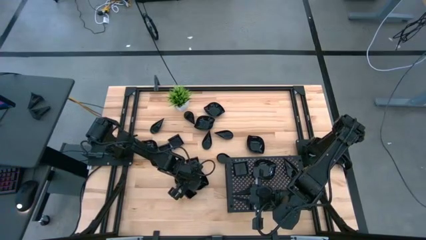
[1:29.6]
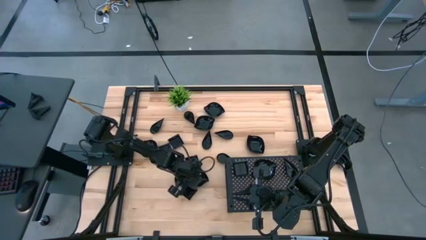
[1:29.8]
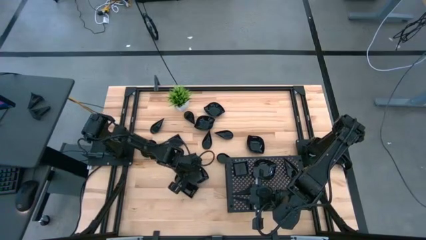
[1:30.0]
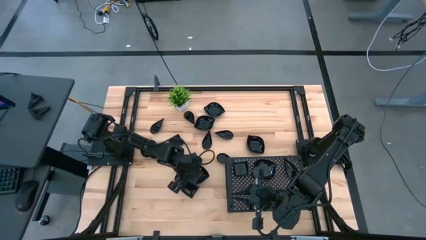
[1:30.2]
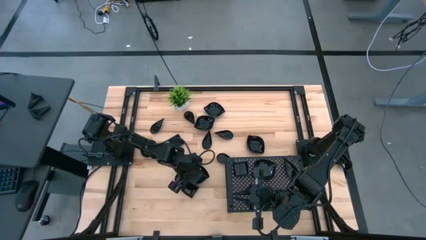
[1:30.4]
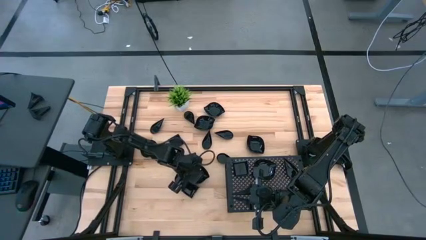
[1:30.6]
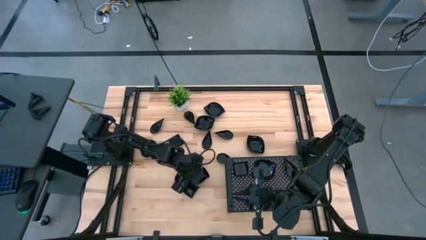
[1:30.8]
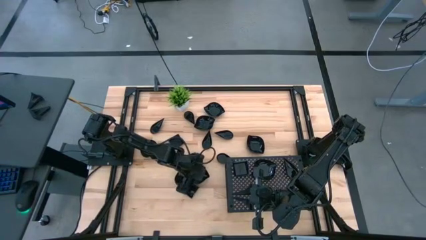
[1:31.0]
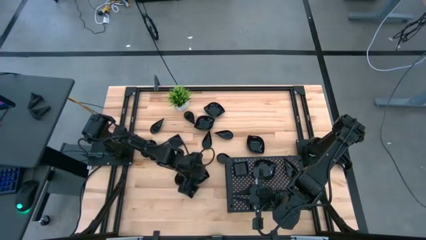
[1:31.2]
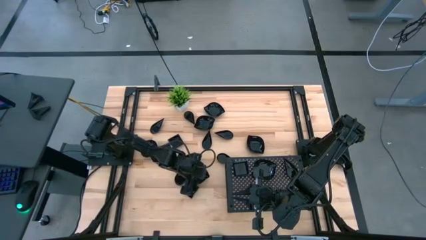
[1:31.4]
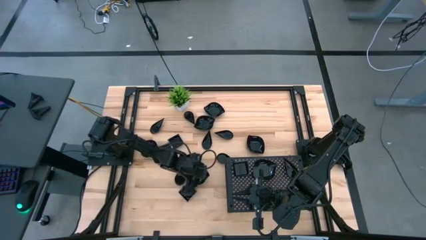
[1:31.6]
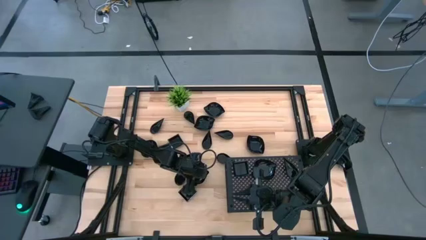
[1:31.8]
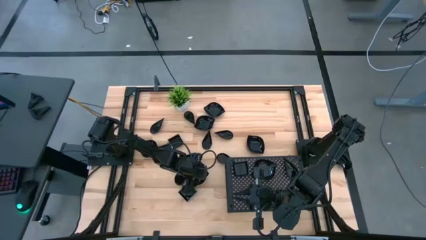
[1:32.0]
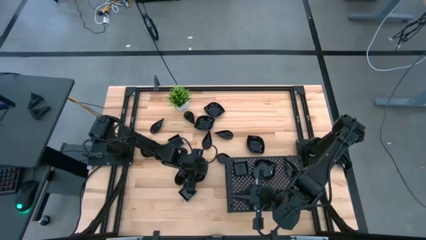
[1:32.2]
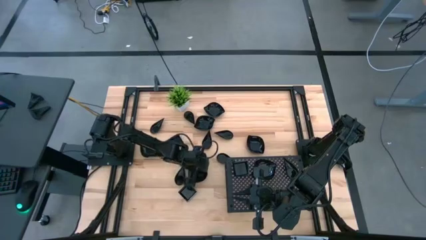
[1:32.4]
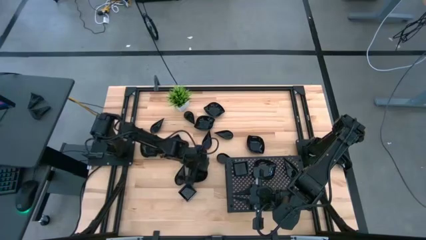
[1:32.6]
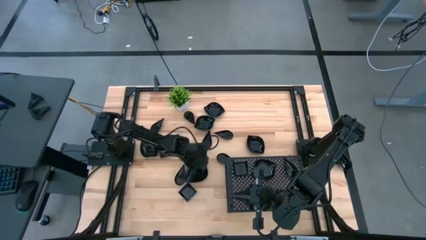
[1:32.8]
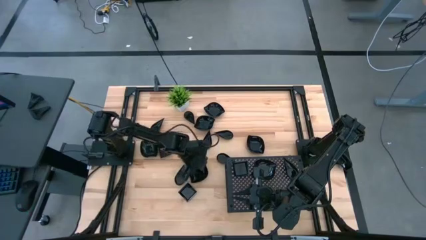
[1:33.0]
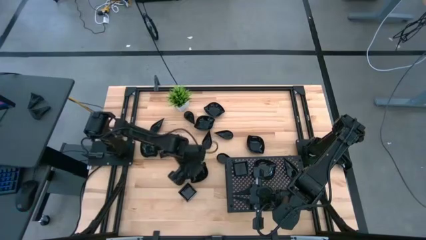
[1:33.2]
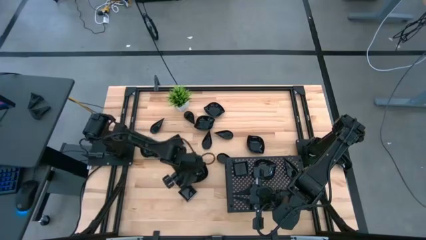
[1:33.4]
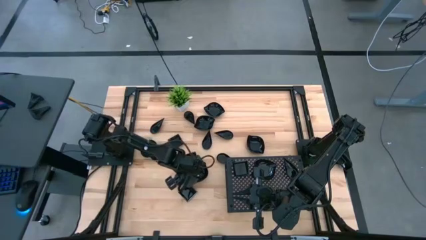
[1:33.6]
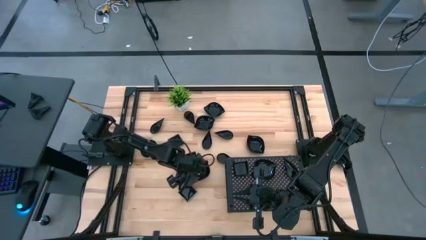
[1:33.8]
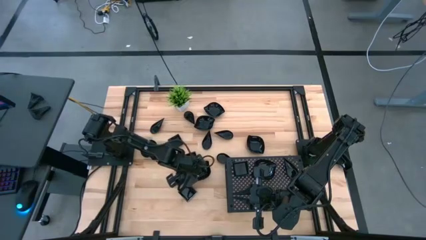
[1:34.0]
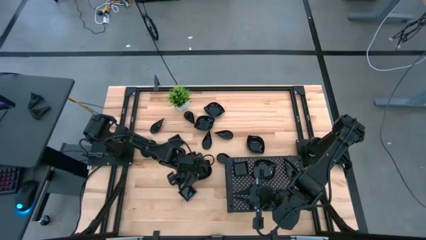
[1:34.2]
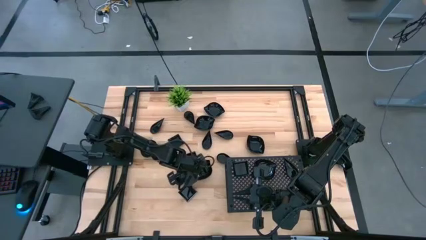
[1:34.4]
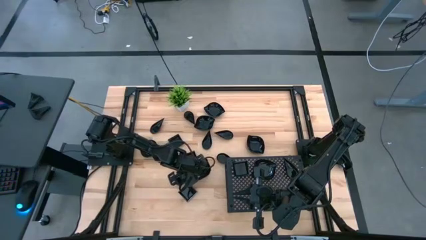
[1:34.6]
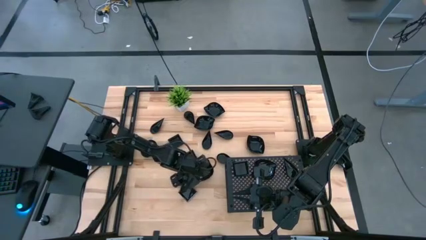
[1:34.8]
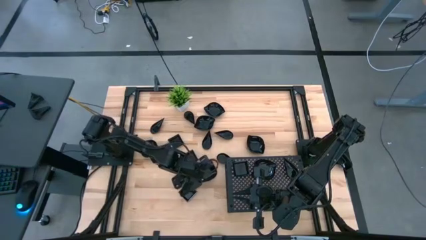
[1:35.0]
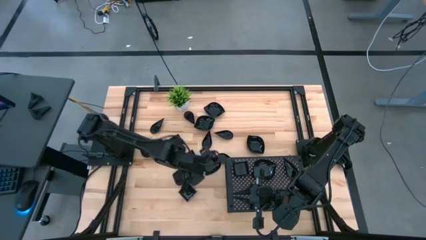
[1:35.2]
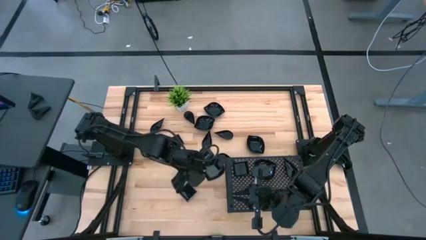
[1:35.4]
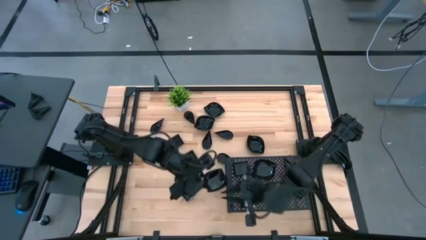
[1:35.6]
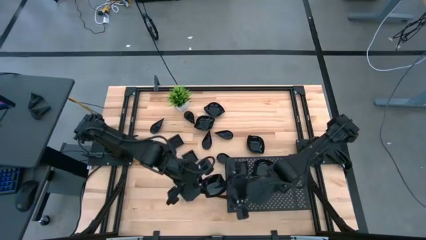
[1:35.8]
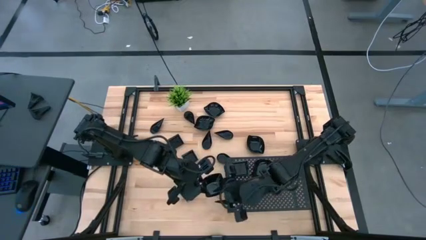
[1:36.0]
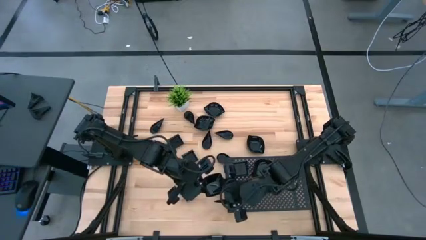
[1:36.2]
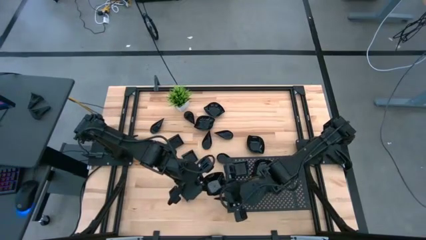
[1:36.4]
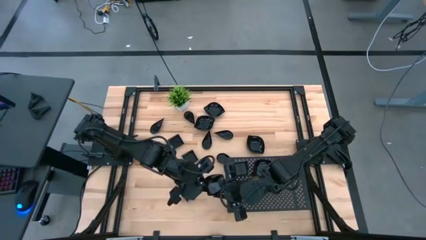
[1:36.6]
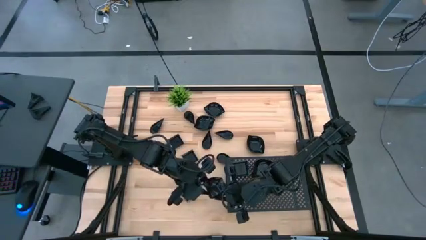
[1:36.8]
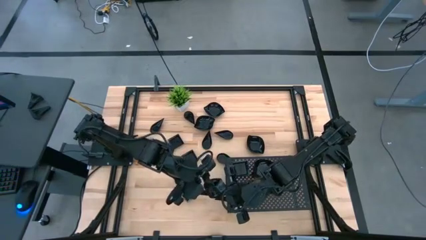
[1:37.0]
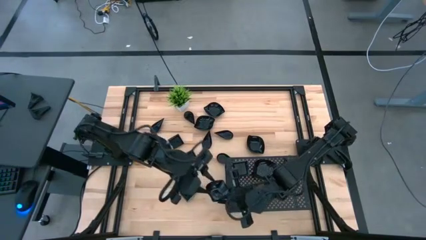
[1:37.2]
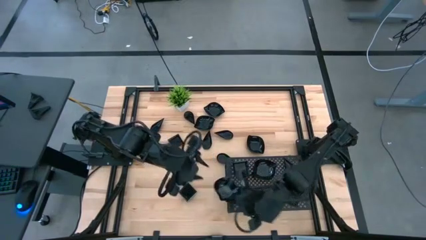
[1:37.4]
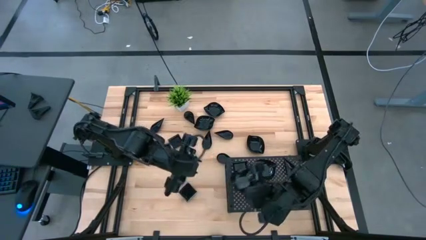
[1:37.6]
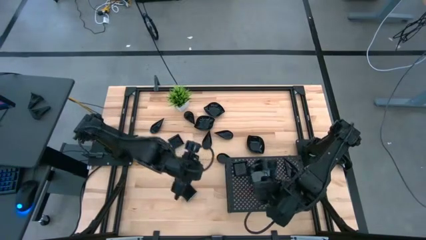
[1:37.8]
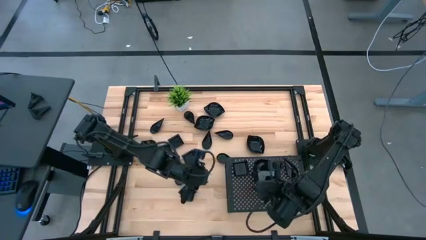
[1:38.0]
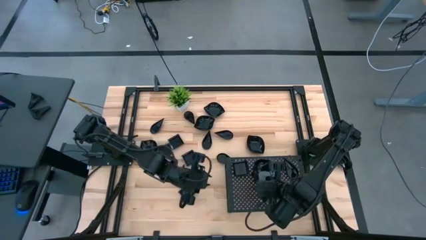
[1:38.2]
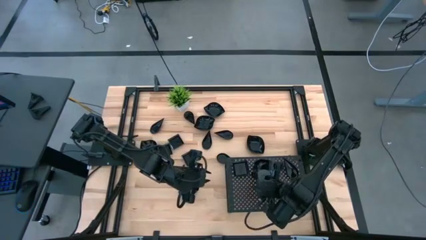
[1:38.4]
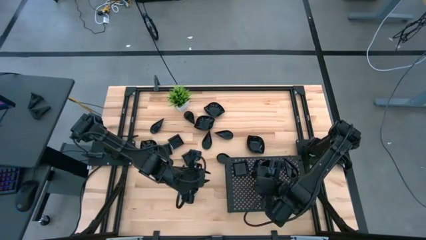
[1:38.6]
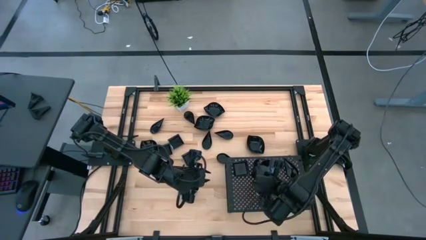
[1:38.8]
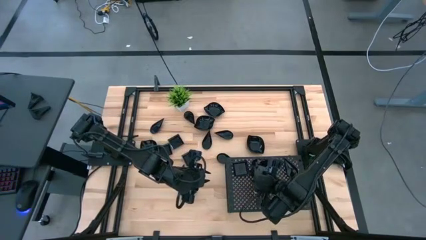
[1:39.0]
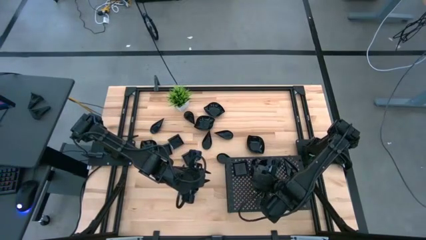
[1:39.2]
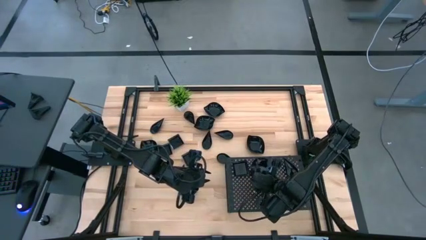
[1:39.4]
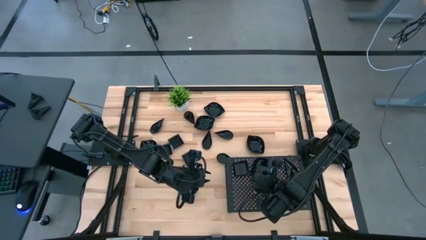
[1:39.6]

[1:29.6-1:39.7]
Task: Pick & Place Mini shaped plates
Stack the leaf shaped plate on top of the leaf shaped plate on the shelf

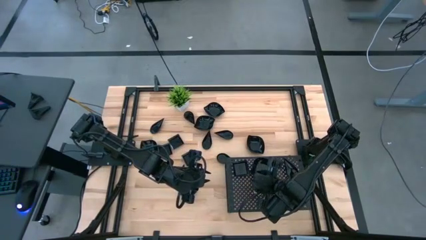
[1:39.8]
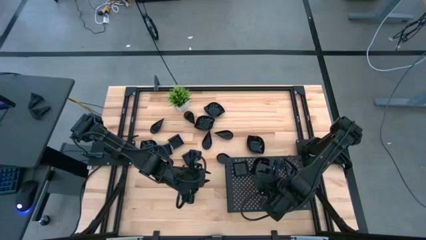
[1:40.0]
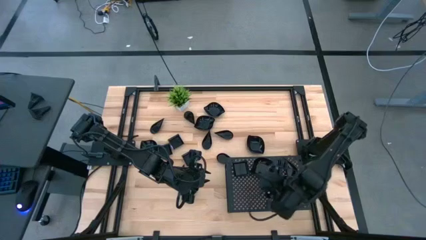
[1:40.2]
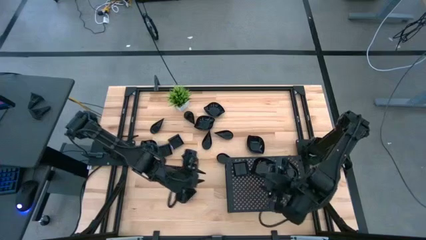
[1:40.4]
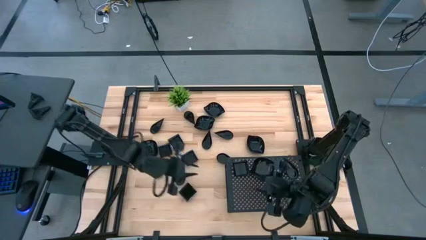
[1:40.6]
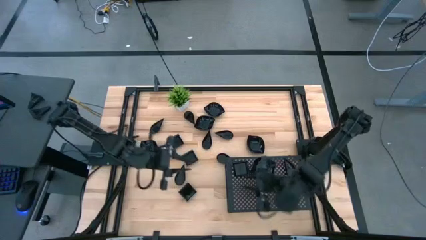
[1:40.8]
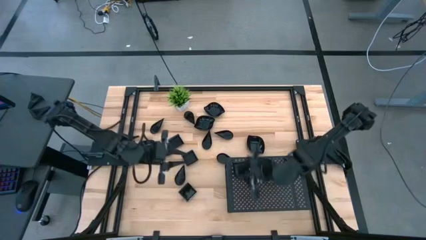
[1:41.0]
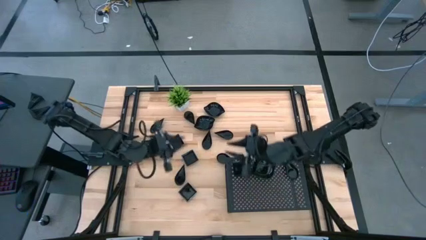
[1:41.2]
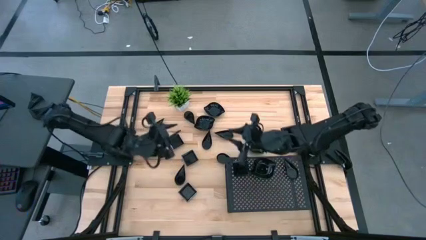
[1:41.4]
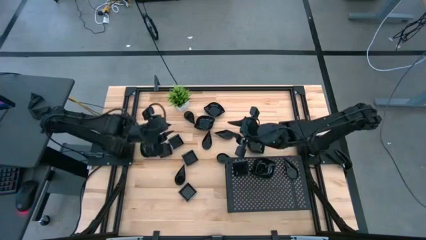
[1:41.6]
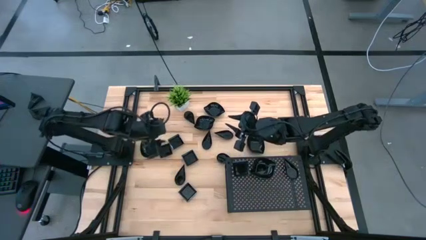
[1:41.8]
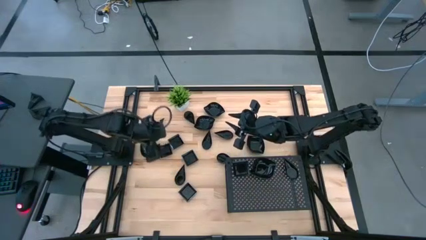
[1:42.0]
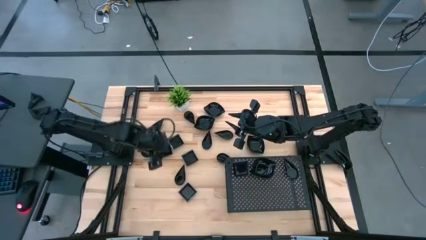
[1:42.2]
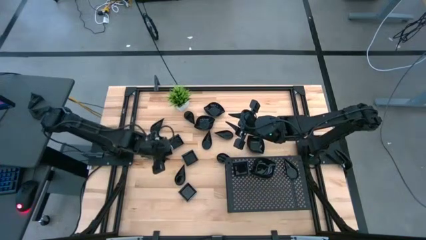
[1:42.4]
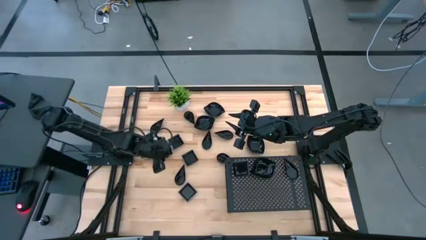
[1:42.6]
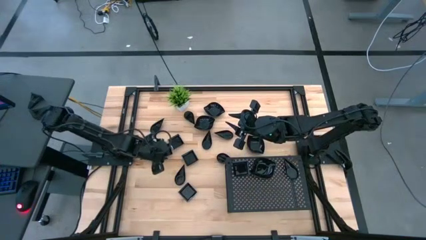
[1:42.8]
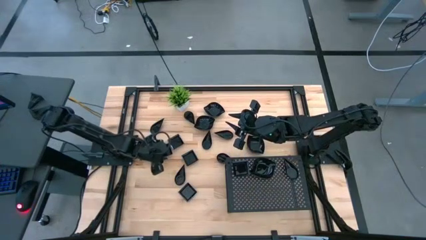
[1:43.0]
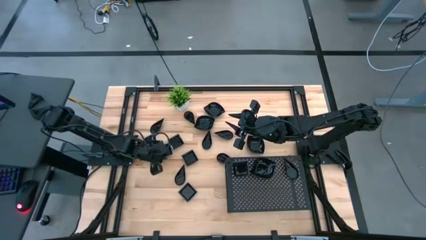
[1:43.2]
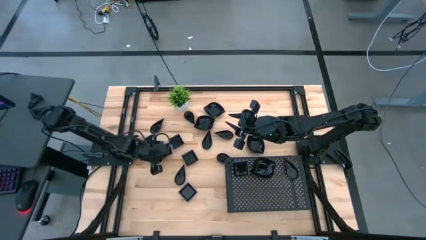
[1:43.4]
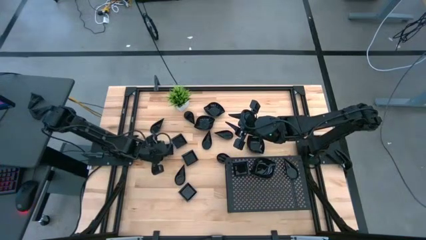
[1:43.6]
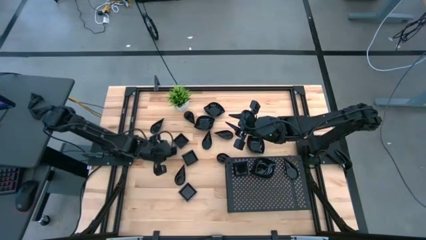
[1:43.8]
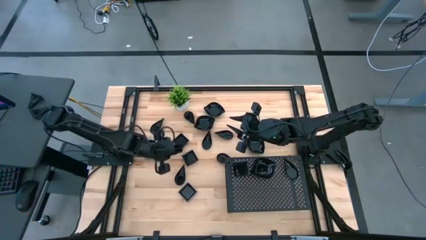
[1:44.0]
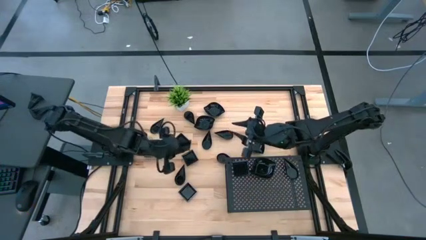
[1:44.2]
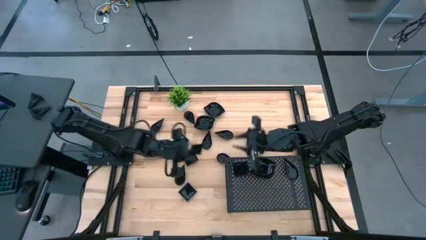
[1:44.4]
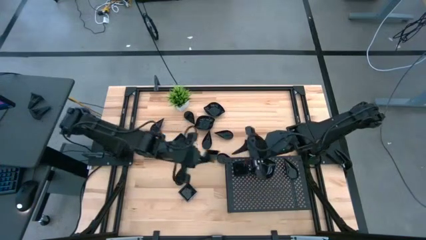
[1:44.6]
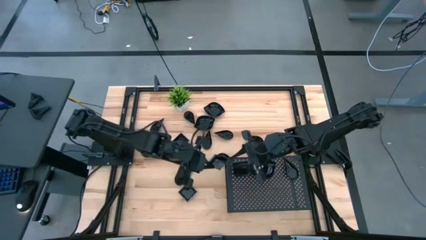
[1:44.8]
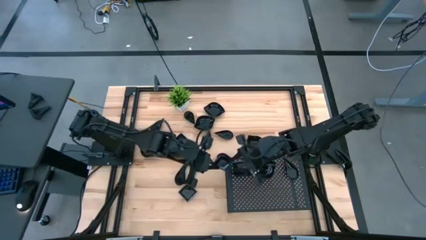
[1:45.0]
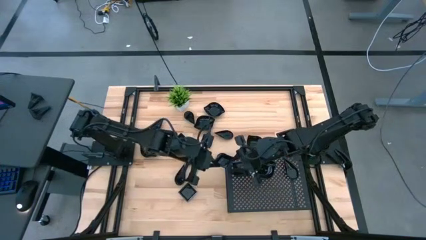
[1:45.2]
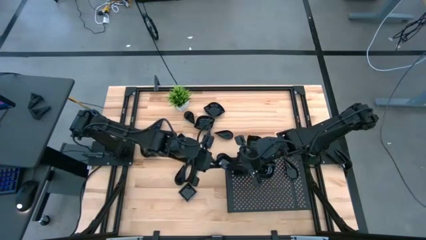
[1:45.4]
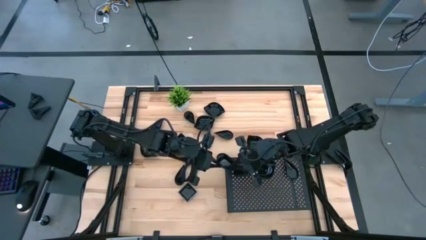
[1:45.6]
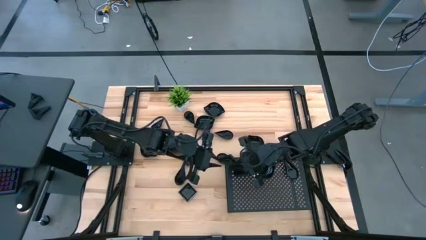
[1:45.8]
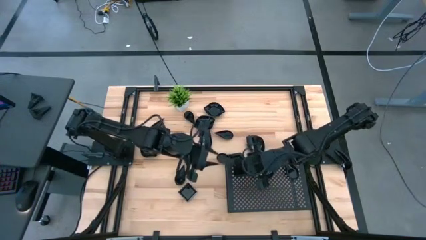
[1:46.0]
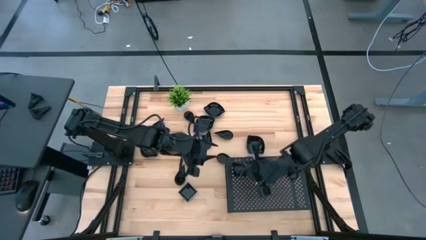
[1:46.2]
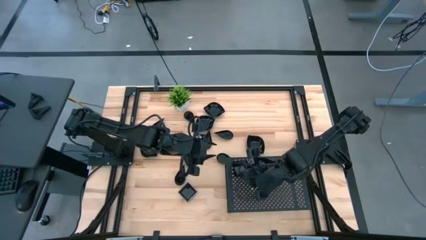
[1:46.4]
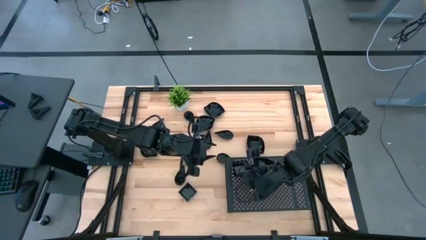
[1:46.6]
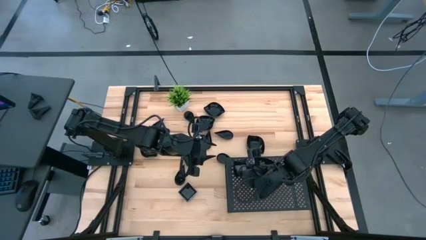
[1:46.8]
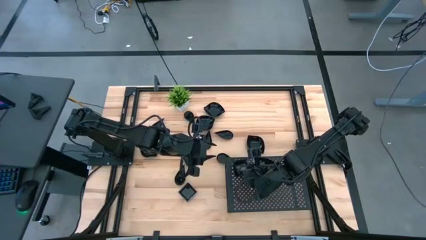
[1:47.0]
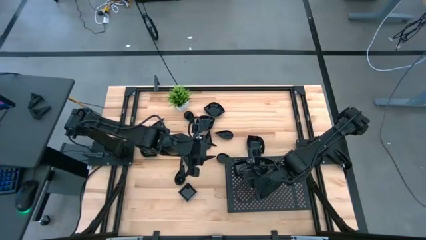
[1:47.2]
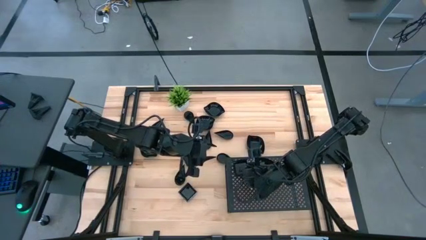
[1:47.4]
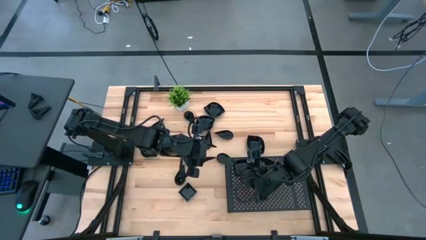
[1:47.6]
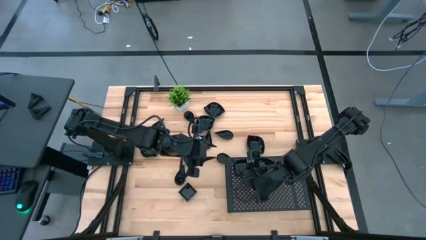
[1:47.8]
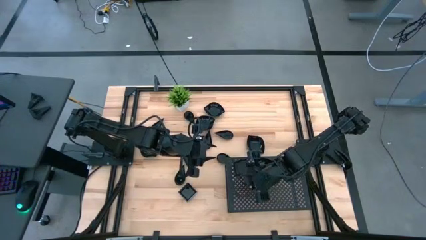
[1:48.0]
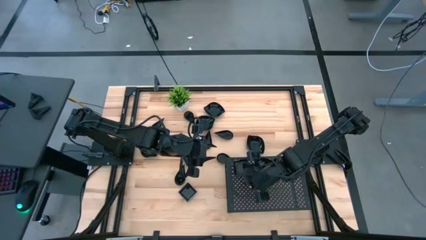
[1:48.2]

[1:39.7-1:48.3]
Stack the square plate on top of the square plate on the shelf
